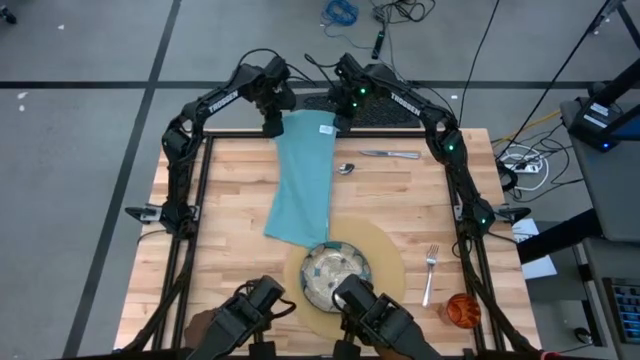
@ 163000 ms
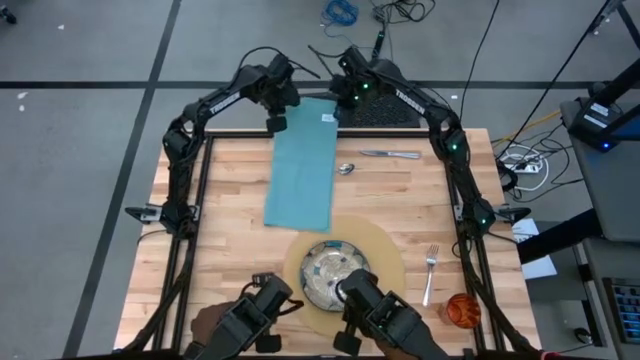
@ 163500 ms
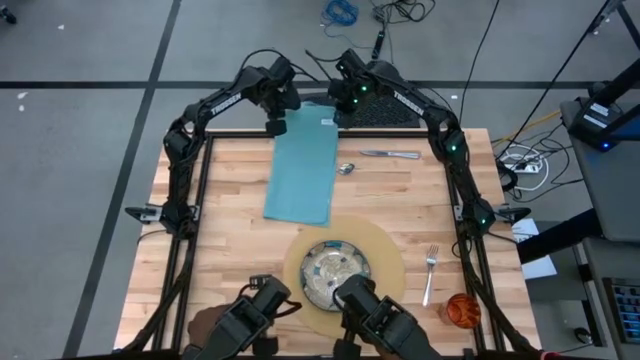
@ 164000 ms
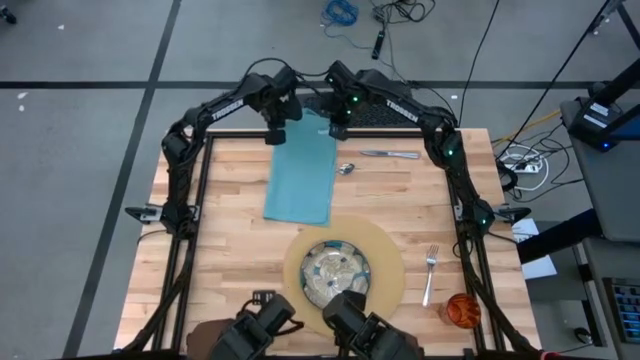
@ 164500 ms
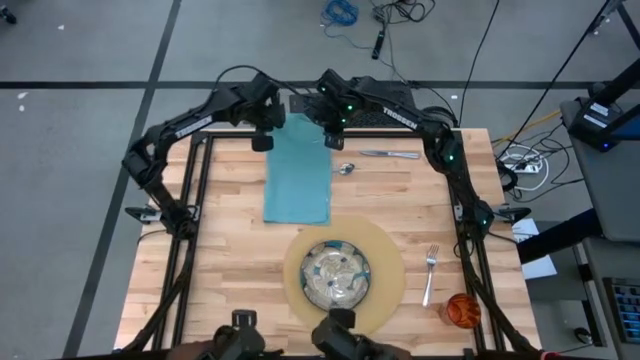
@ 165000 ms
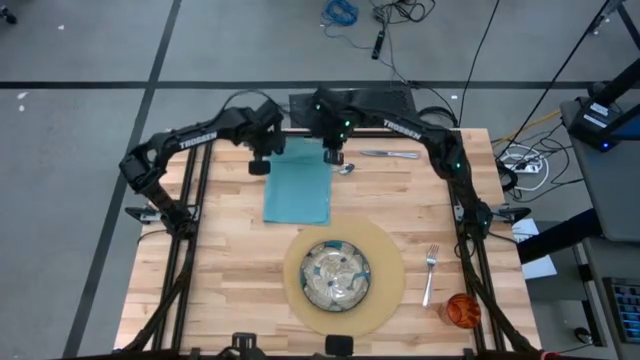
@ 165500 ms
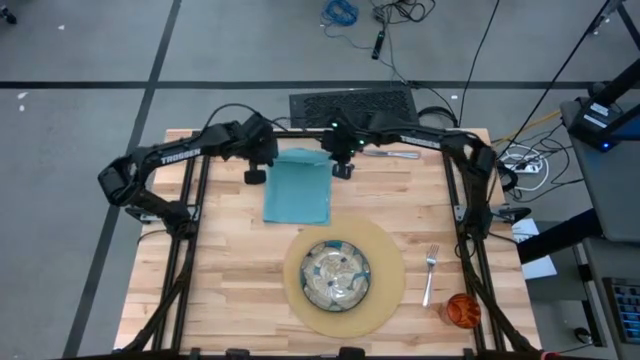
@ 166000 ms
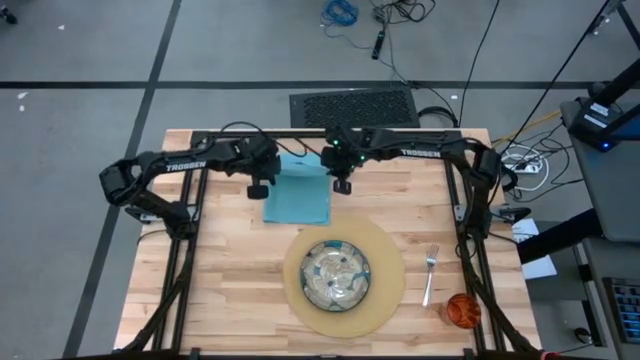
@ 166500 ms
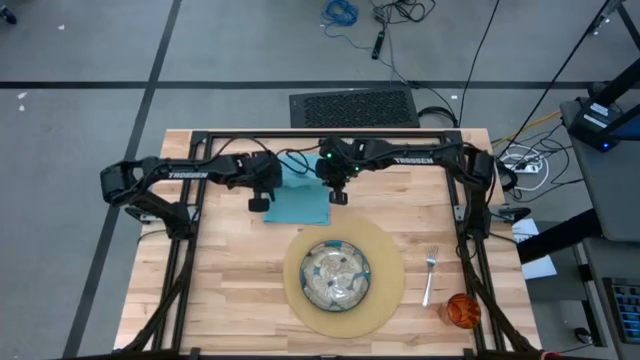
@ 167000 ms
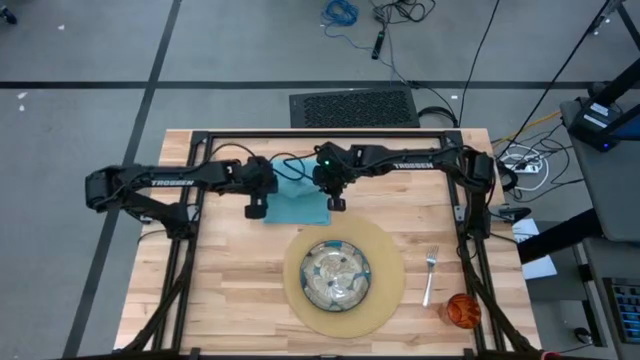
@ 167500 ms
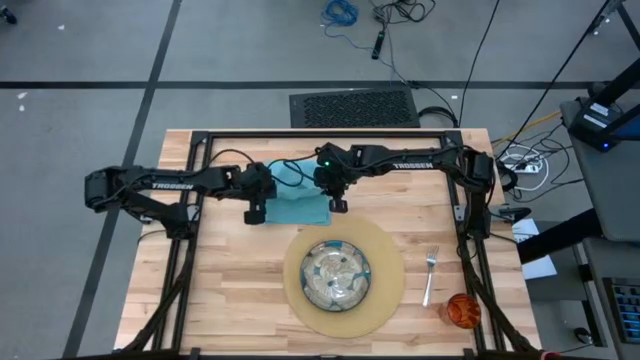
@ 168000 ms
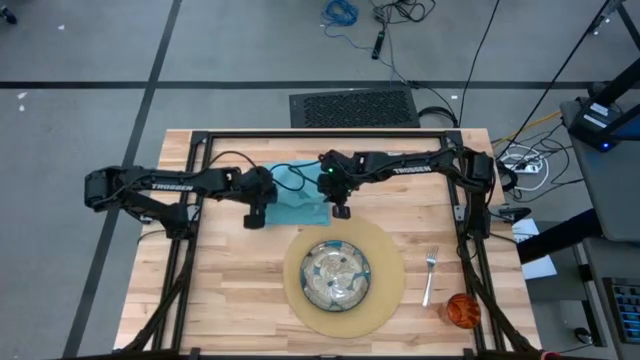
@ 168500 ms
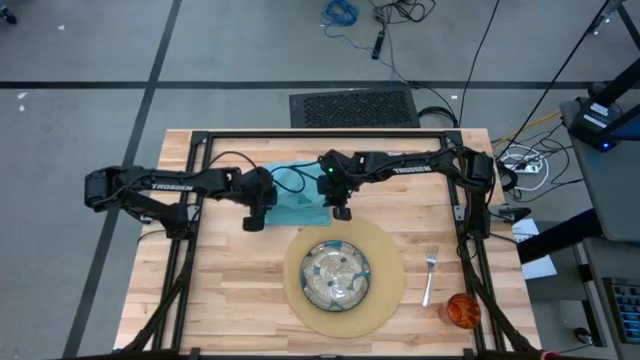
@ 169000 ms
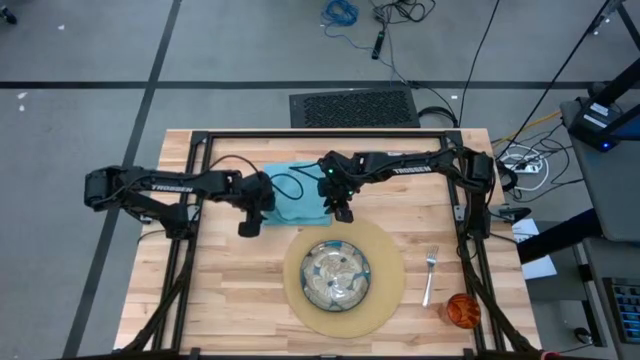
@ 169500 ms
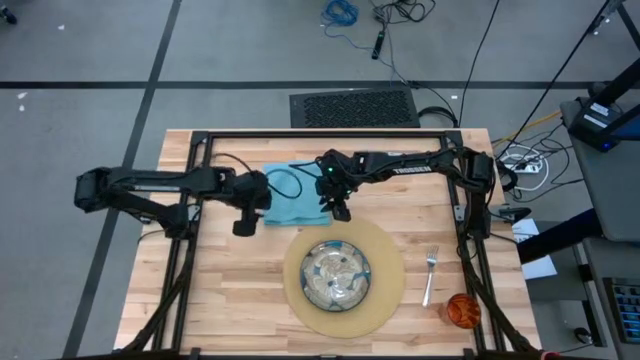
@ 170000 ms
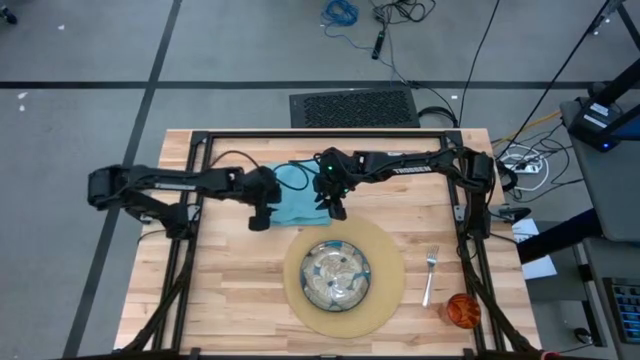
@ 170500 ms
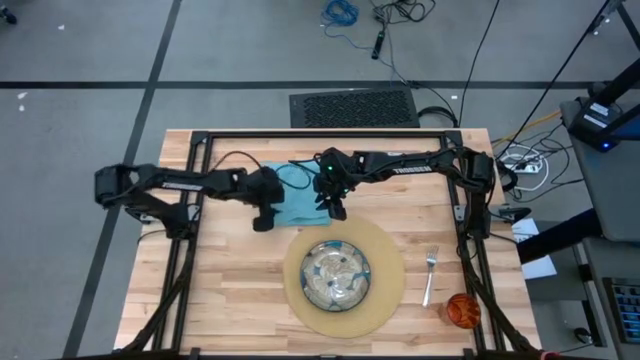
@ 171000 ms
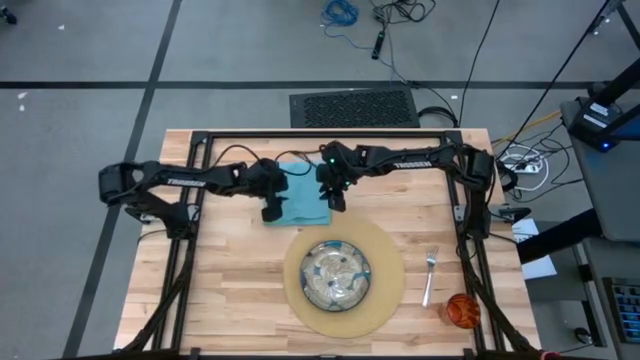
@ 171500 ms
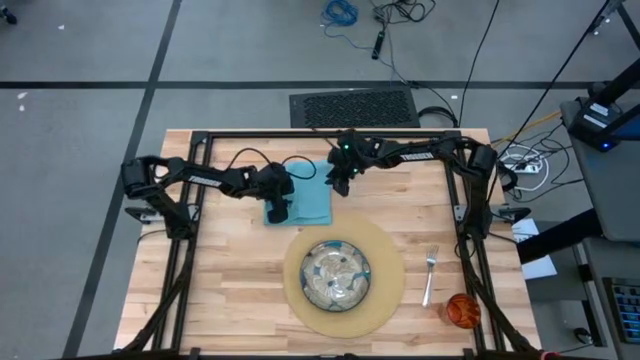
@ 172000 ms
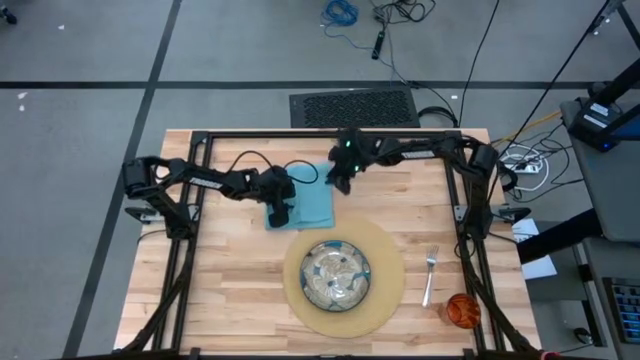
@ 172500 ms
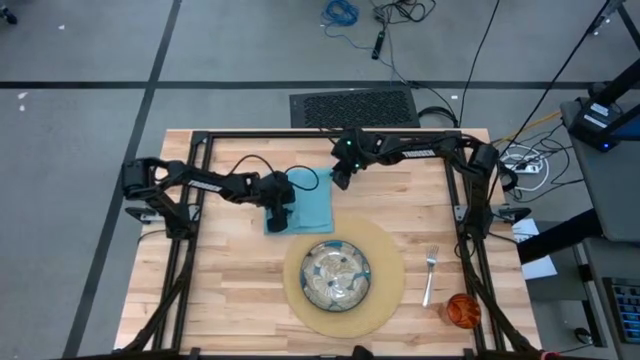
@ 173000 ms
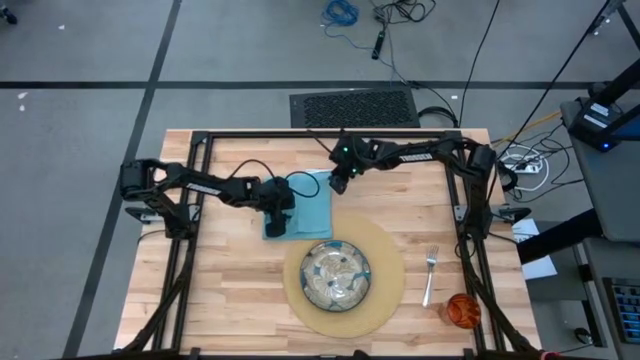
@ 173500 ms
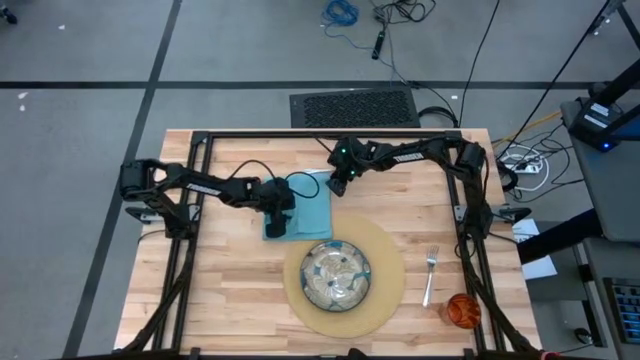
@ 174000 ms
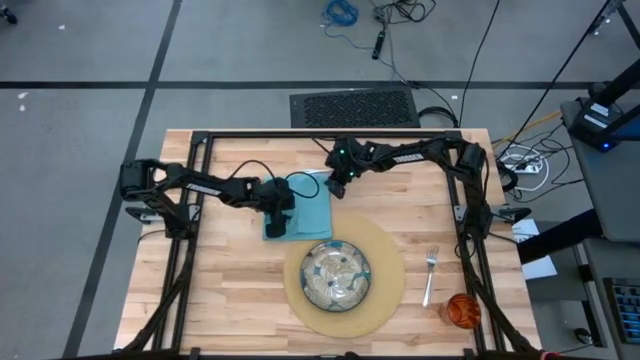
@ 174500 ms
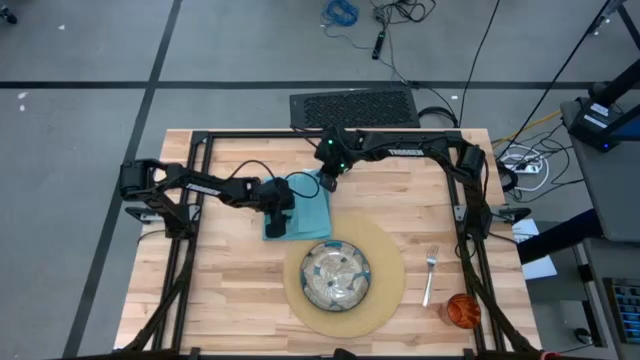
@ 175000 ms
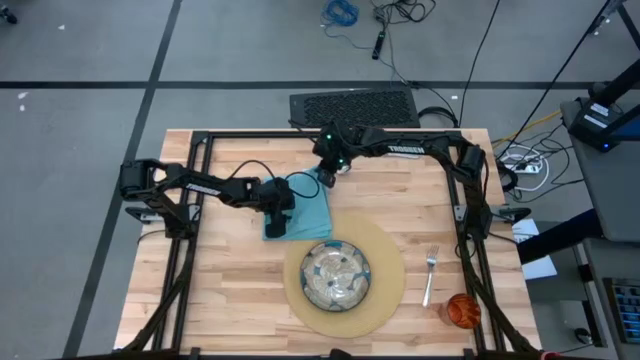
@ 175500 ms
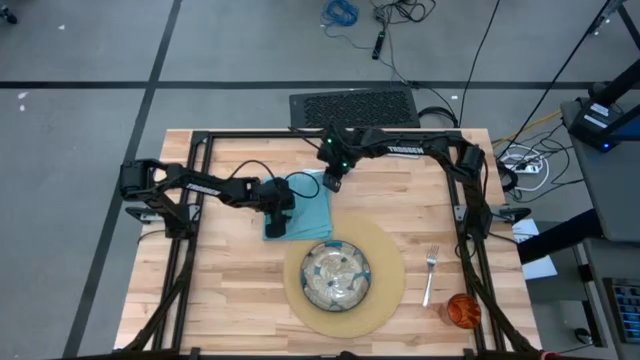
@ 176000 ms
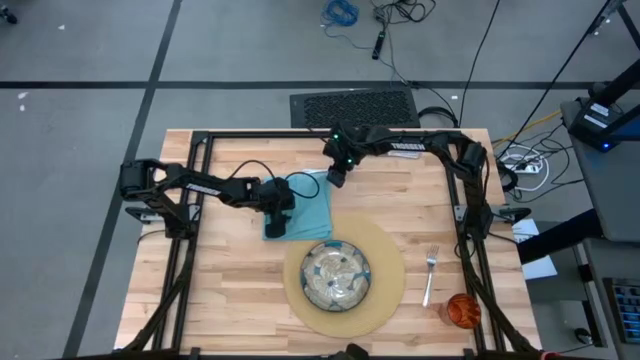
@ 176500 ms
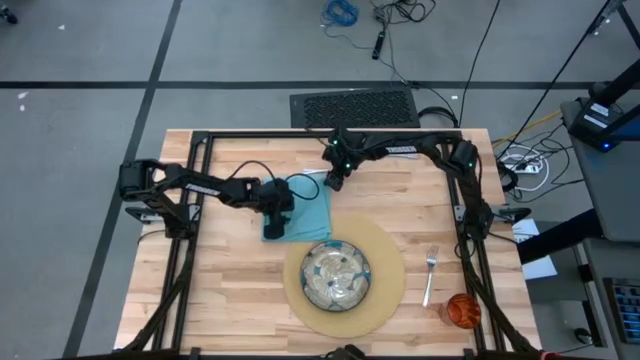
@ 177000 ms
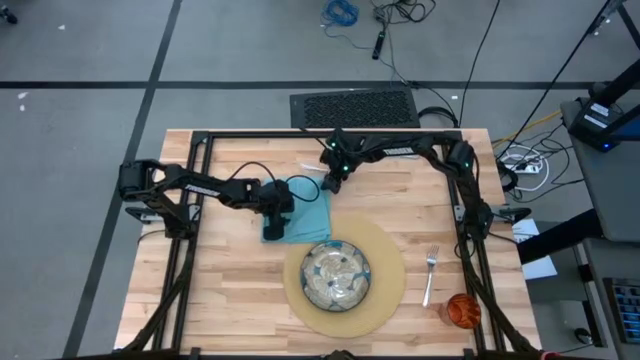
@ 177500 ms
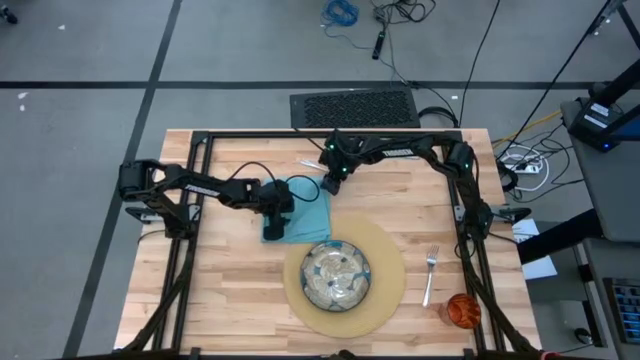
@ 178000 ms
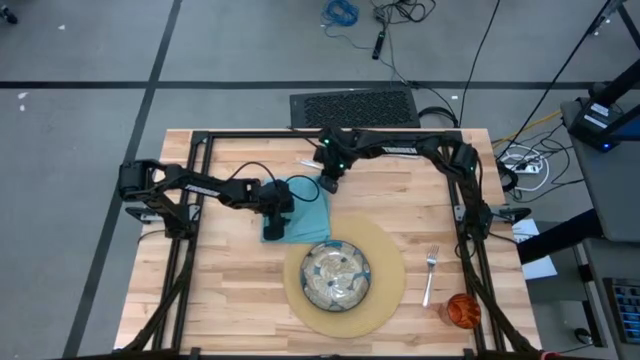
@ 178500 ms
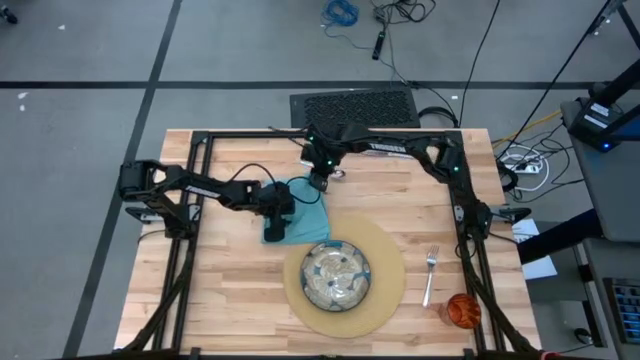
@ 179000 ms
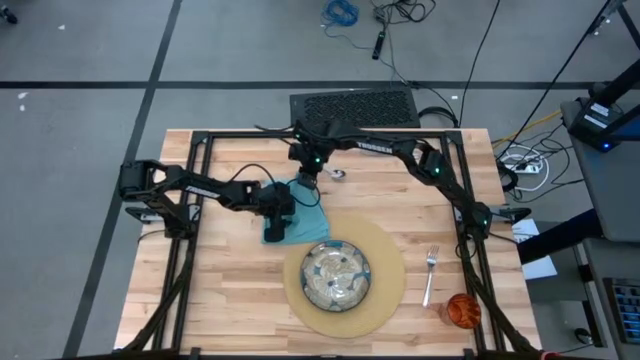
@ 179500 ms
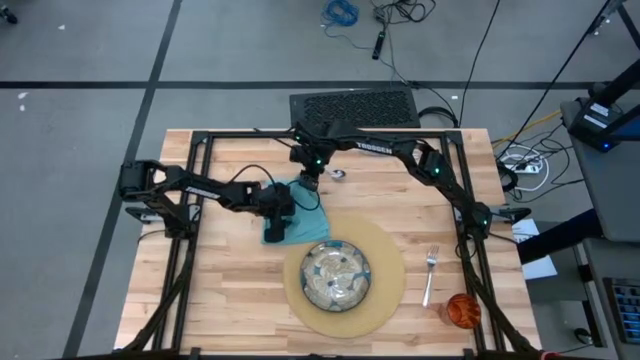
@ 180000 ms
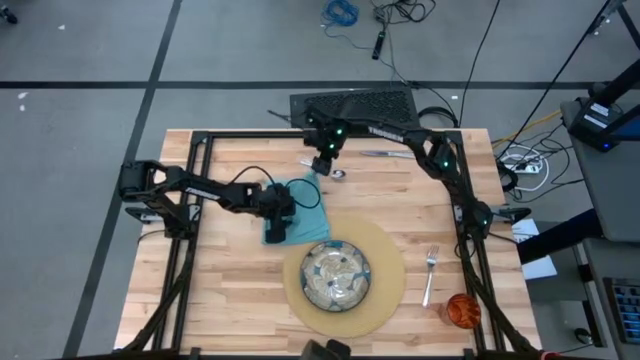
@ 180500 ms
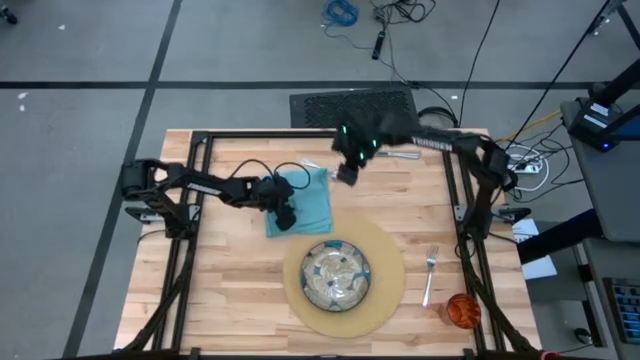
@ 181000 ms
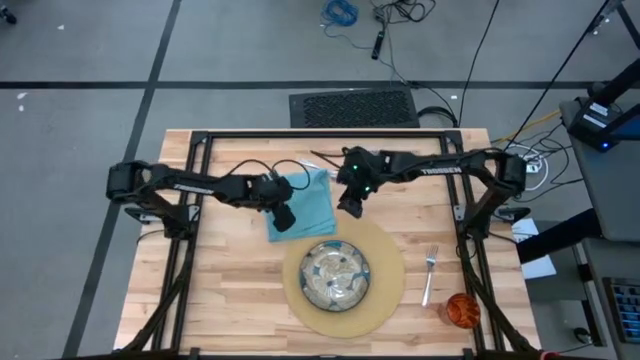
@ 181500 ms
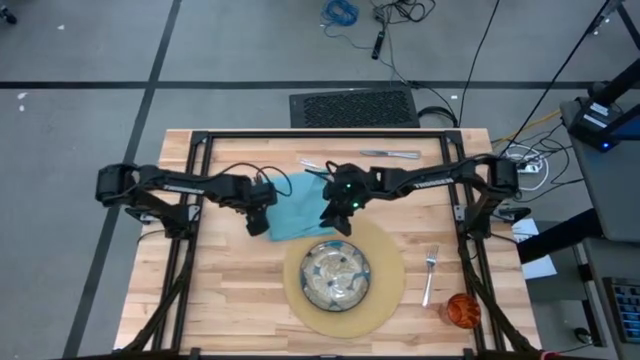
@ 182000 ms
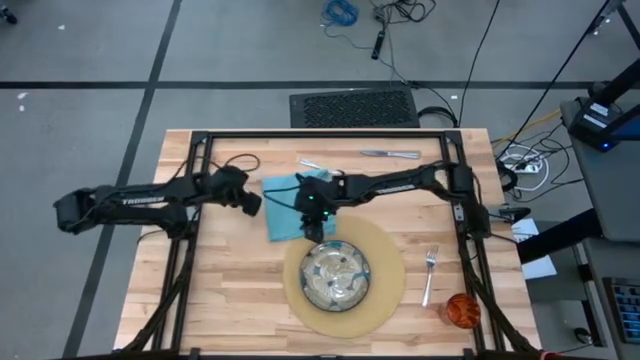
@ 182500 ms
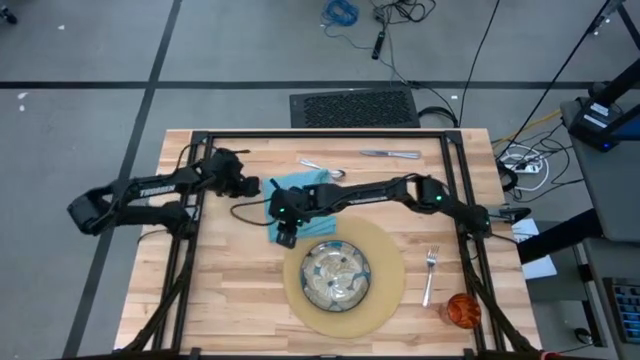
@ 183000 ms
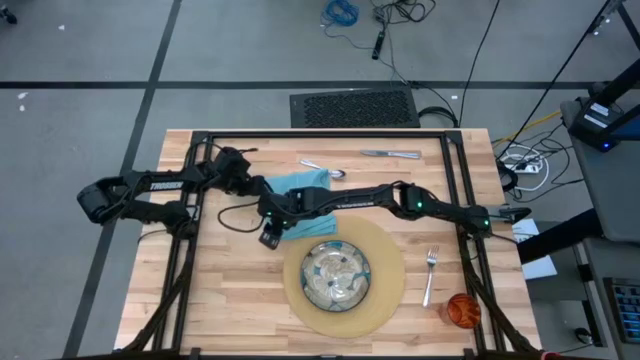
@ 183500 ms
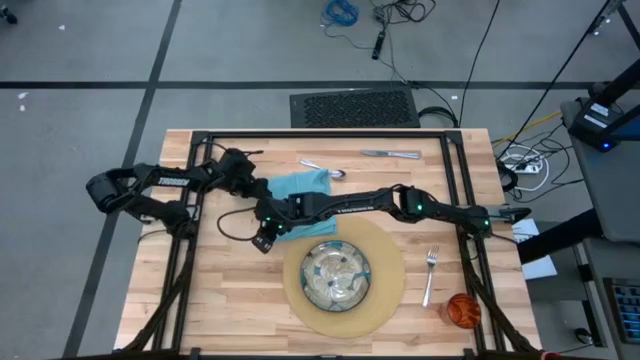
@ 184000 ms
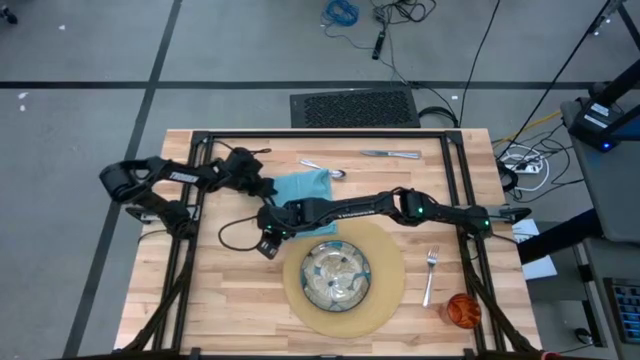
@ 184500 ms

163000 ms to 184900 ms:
Task: Set table place
Fold the blue napkin
